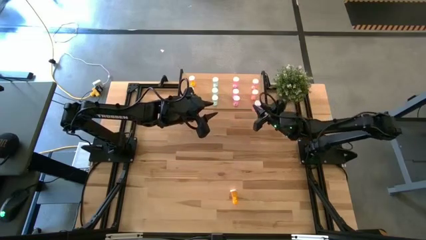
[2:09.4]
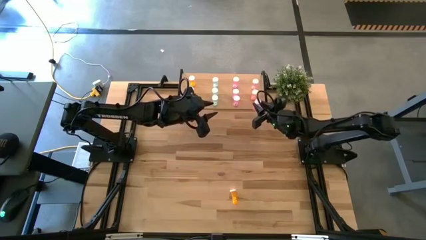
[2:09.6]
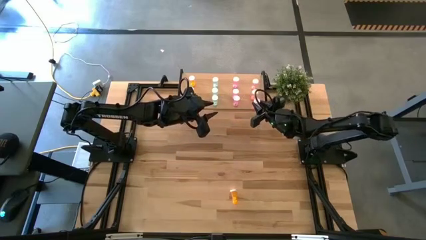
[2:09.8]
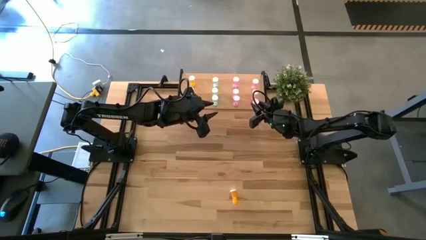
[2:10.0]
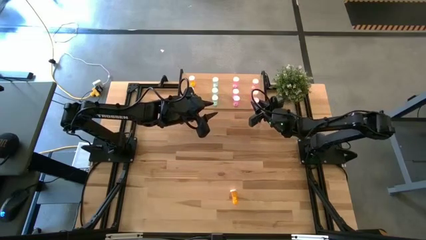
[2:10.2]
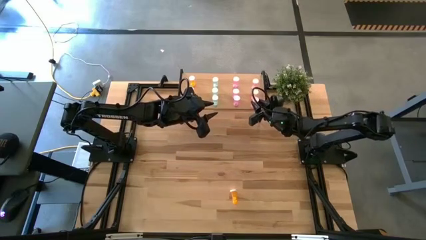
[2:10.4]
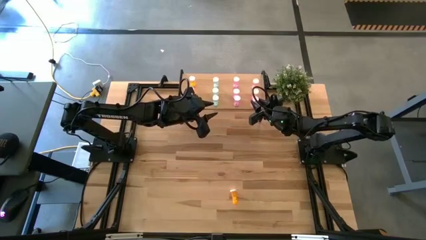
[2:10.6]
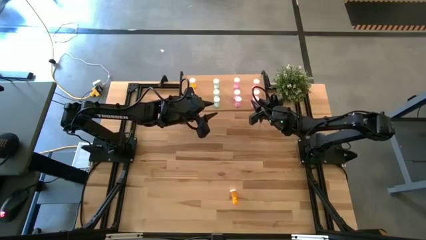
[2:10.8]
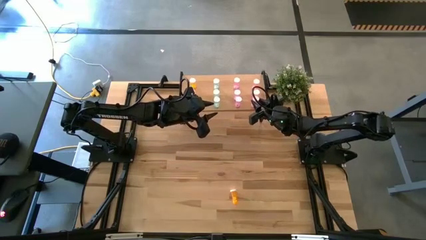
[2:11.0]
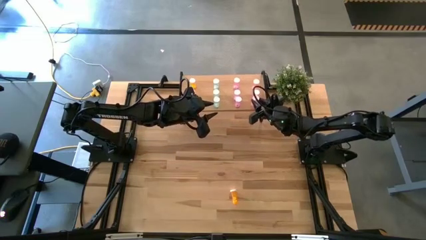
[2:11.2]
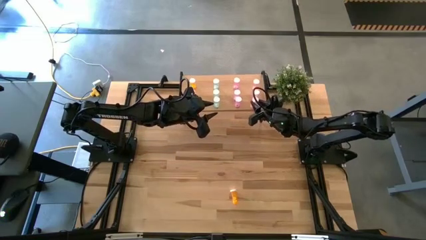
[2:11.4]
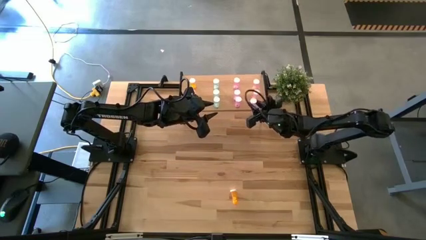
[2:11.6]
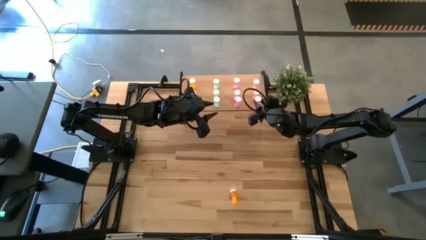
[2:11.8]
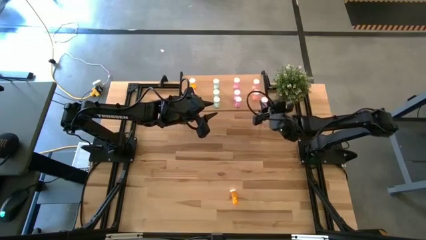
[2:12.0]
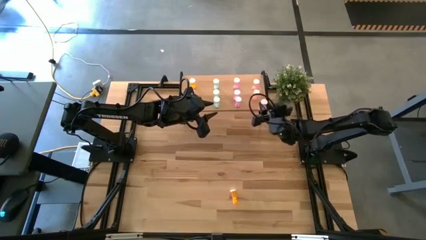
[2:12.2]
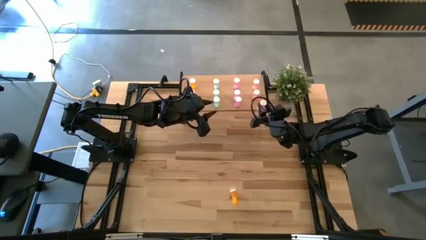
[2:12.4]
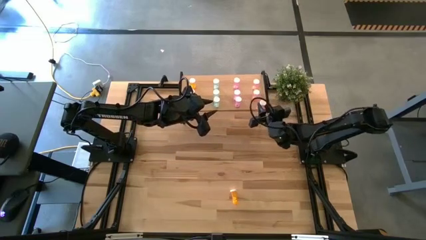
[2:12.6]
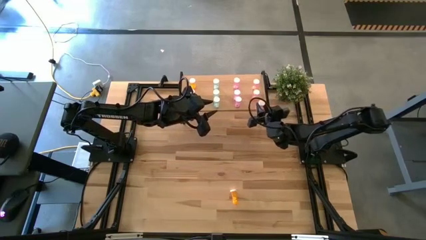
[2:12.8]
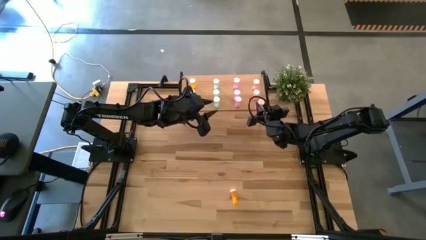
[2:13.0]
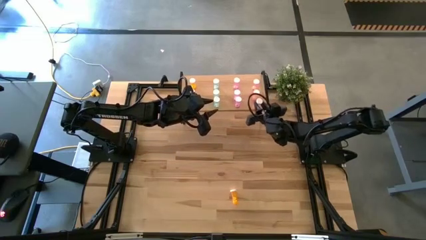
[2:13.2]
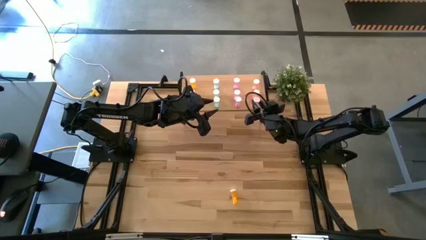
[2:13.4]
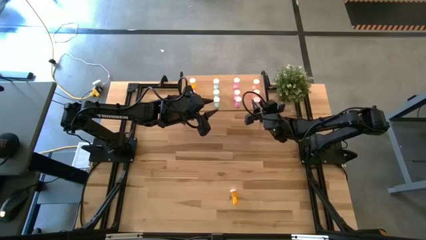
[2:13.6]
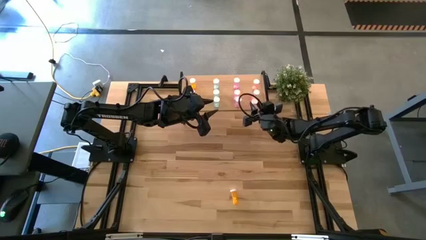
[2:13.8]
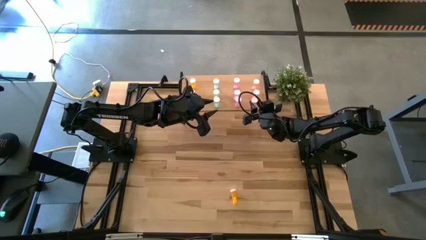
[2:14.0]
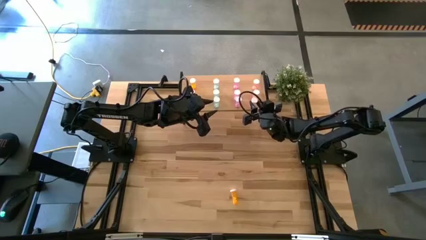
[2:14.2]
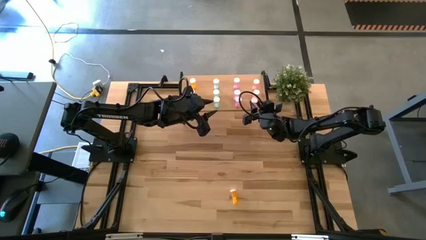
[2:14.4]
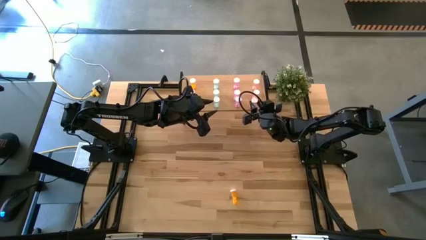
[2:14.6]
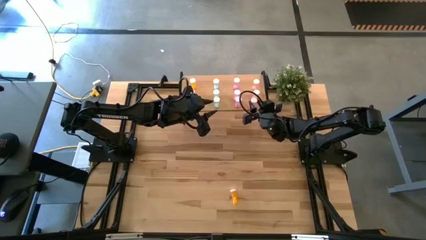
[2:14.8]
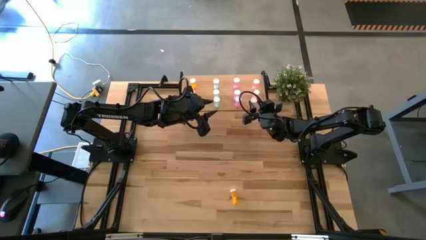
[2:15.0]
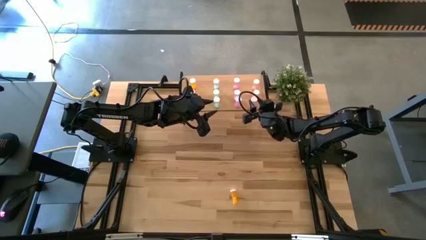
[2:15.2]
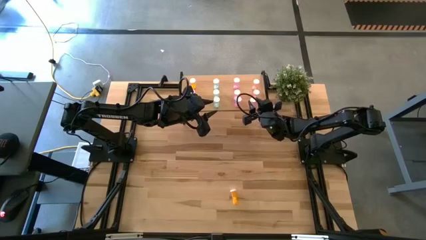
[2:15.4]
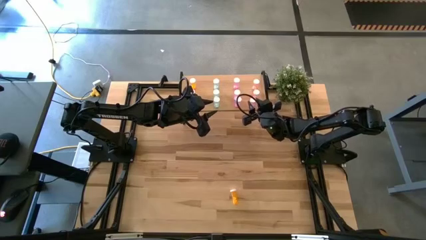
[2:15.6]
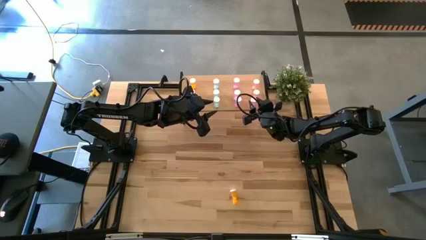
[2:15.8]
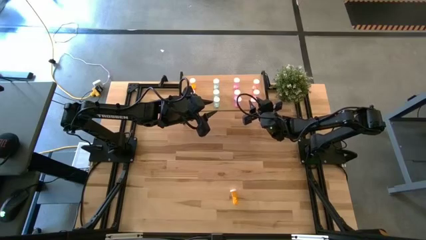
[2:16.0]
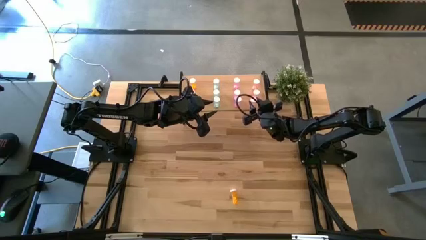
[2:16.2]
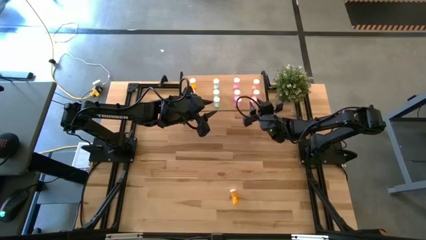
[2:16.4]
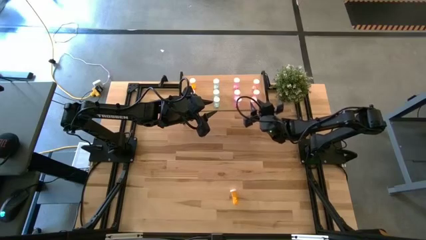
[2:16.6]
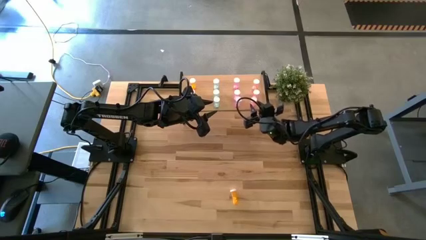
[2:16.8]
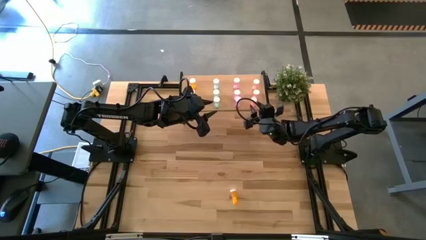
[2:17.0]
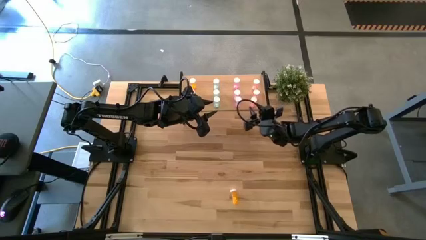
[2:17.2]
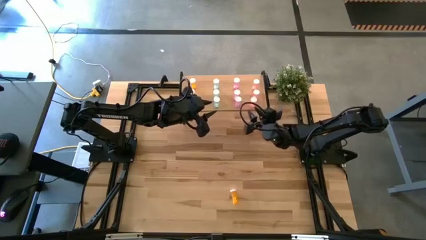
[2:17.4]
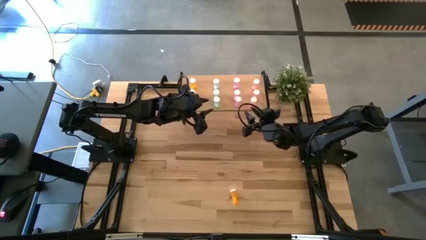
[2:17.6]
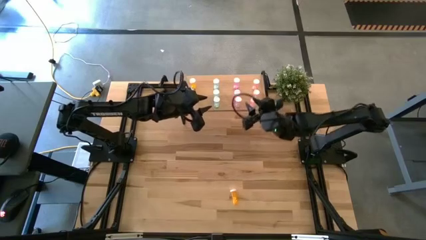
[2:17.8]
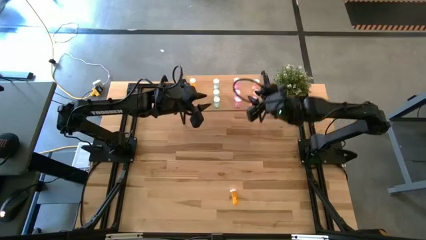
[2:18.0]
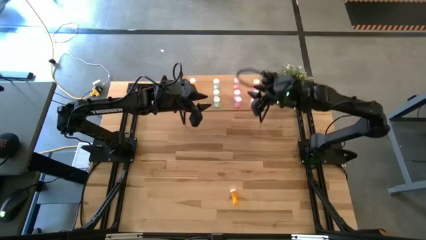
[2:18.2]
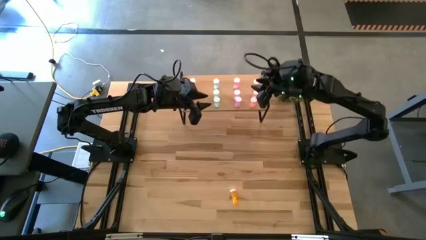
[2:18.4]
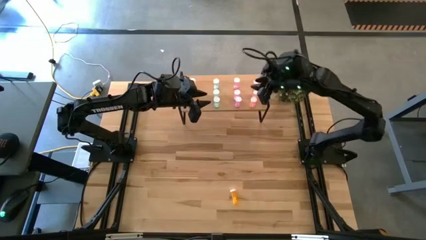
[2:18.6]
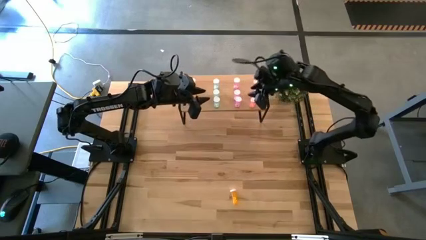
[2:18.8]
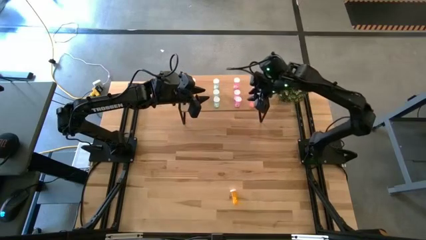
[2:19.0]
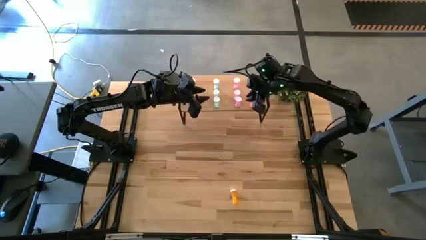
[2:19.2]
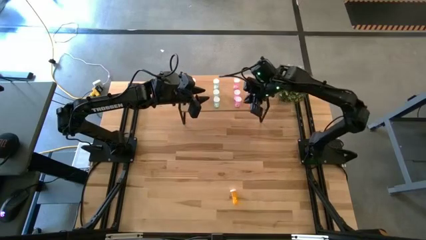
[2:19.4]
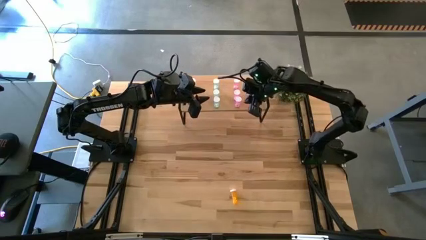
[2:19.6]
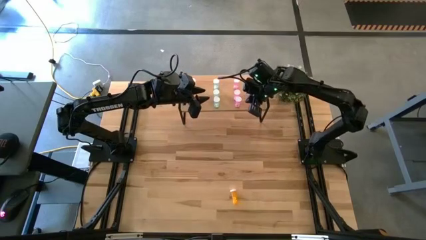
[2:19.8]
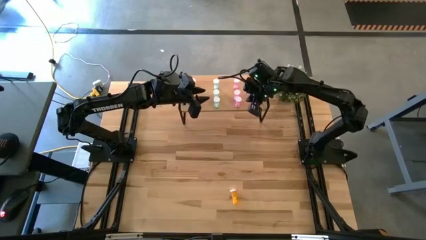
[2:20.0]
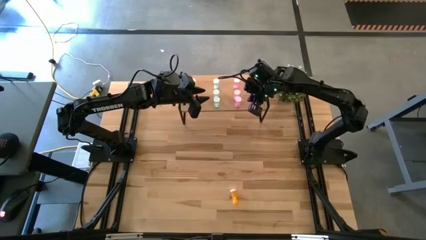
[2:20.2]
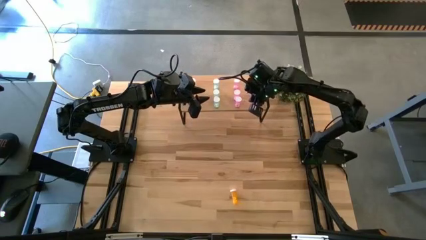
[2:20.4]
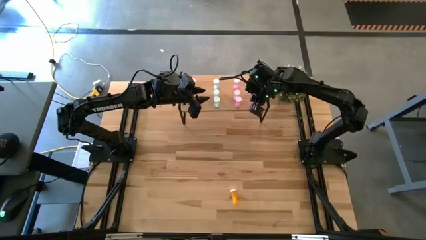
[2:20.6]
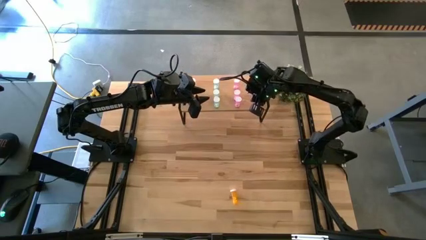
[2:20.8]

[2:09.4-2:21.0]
Task: Pick and place medicine bottles onto shelf by color
Put the pink pill bottle aligned with the other pink pill bottles

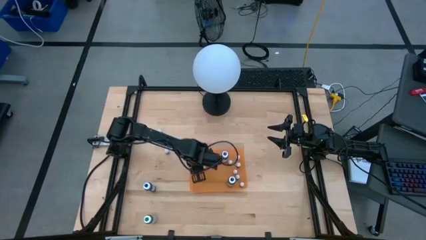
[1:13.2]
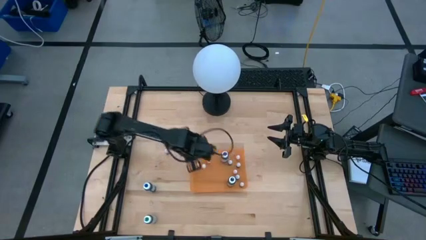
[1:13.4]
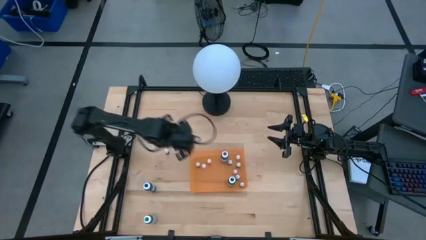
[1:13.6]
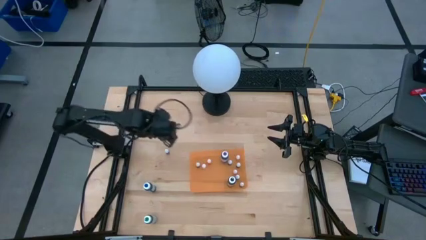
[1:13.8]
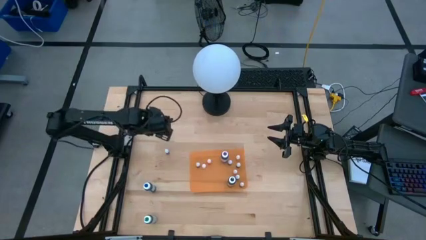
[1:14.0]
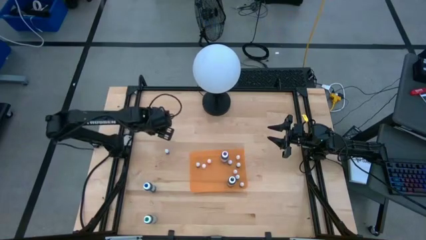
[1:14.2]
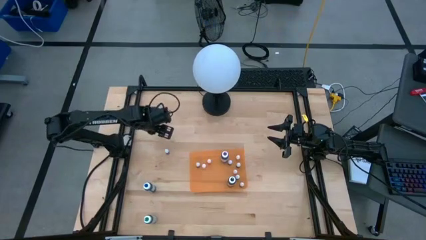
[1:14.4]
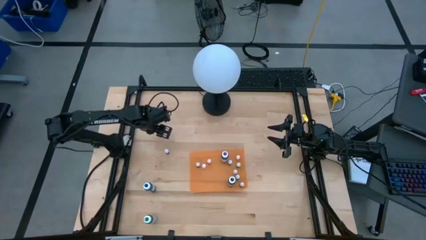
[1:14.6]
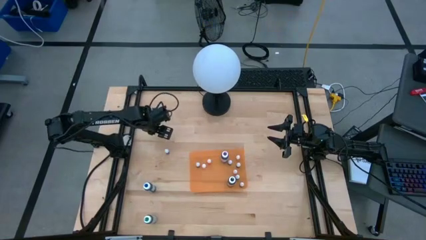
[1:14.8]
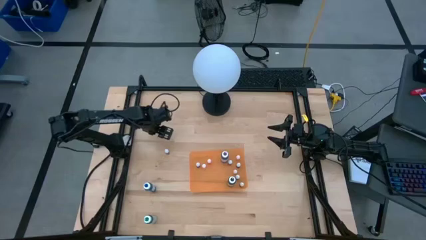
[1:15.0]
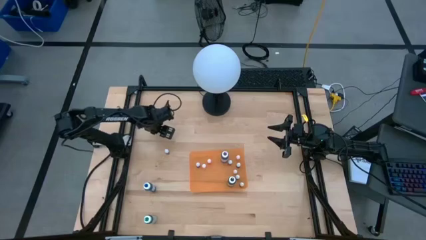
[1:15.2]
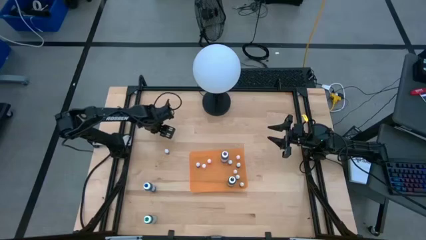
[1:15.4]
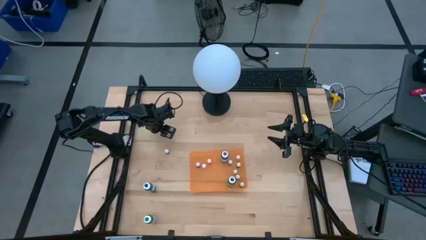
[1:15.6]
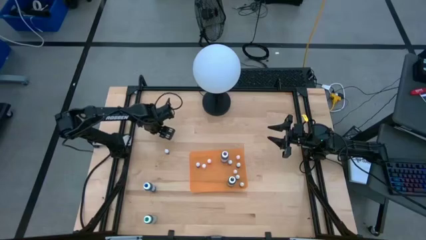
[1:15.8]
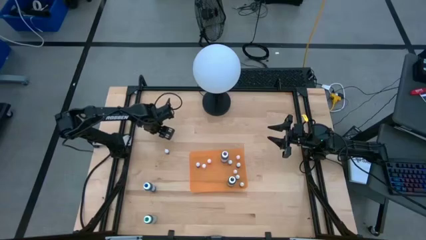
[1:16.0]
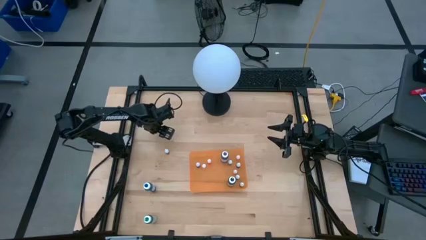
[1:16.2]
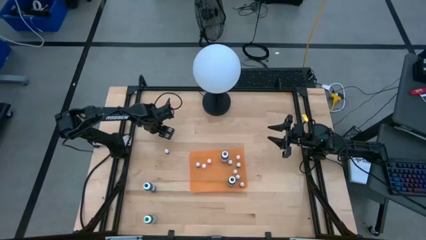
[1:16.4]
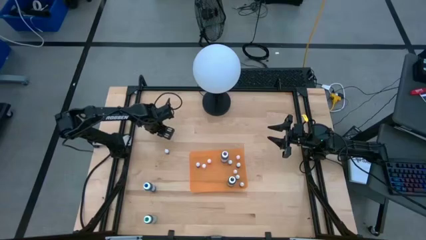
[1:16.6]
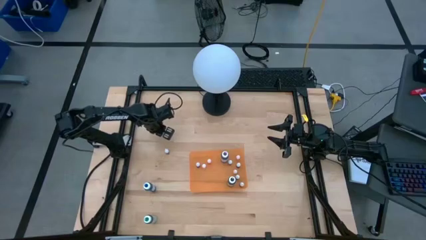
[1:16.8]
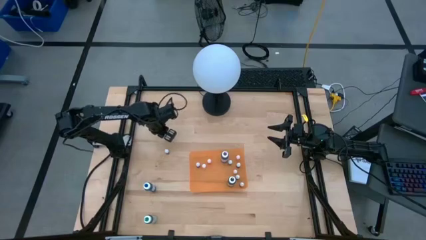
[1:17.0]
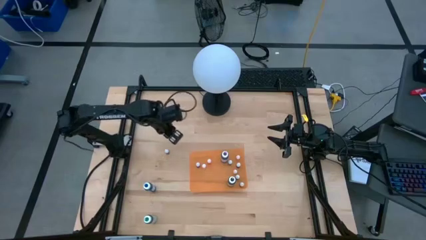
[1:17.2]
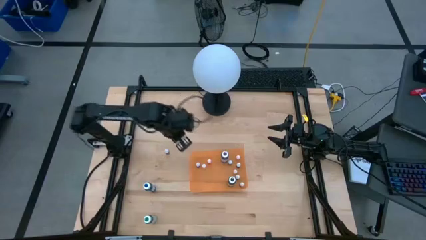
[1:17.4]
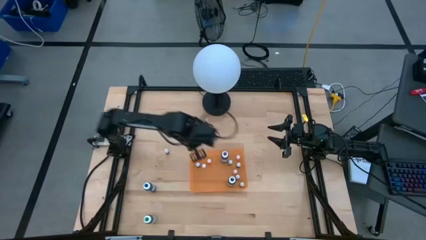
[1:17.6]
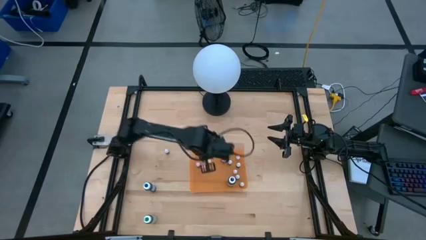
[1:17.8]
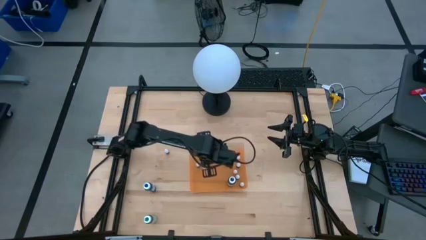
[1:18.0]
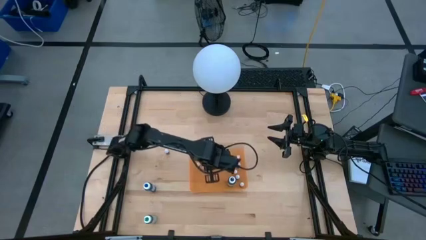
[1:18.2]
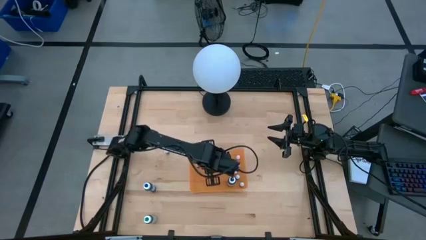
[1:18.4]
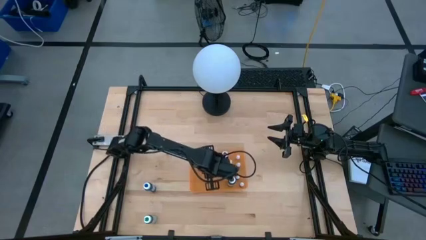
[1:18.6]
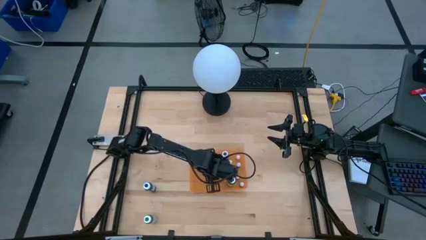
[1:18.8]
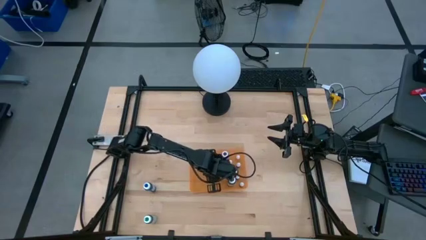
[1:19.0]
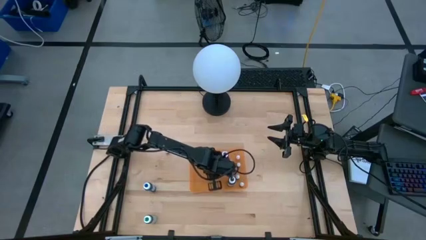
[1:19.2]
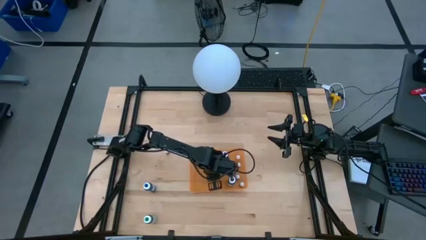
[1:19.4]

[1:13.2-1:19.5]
Task: Pick & Place food coloring
Put the small red food coloring bottle into the orange container
